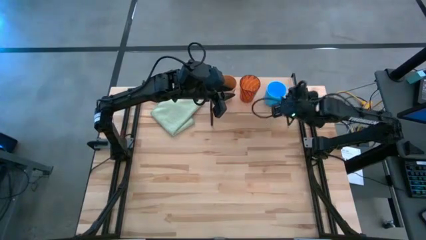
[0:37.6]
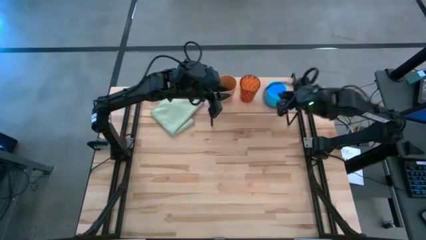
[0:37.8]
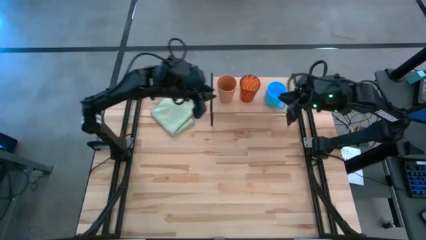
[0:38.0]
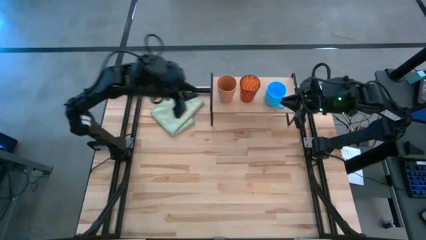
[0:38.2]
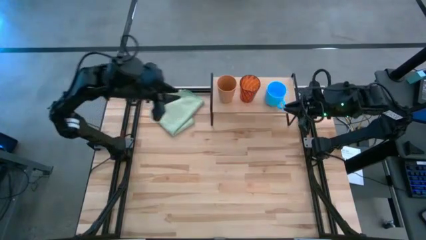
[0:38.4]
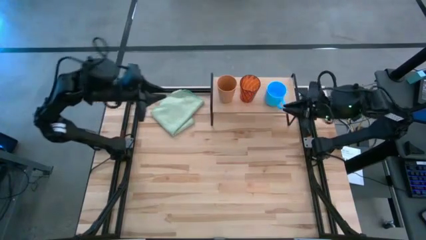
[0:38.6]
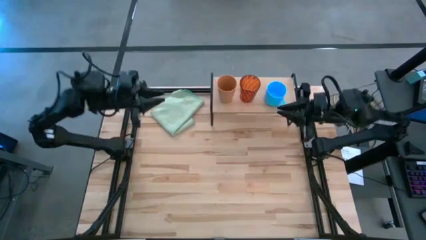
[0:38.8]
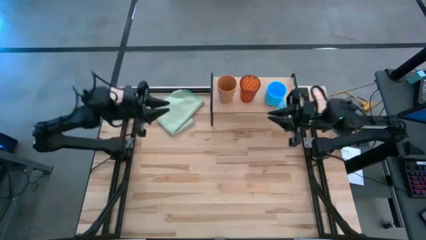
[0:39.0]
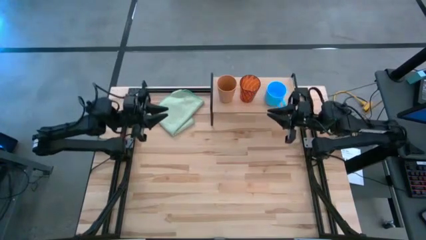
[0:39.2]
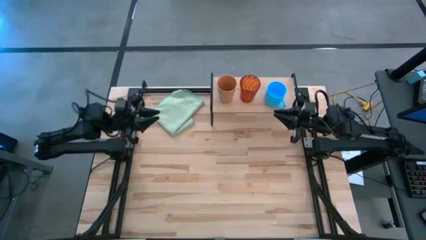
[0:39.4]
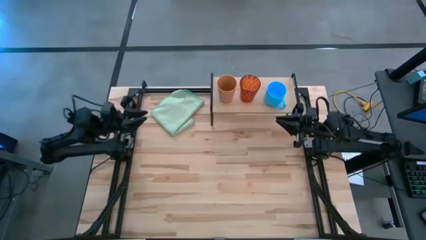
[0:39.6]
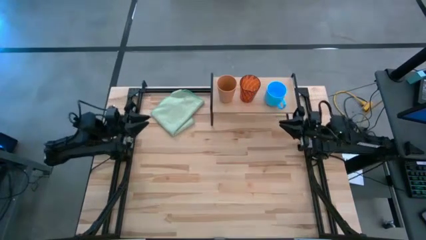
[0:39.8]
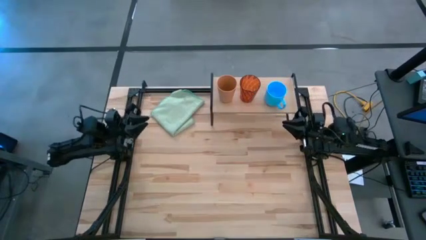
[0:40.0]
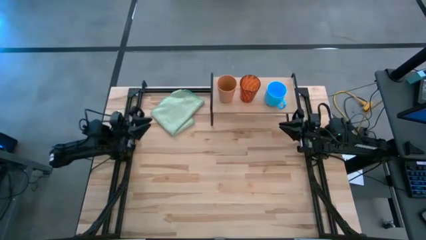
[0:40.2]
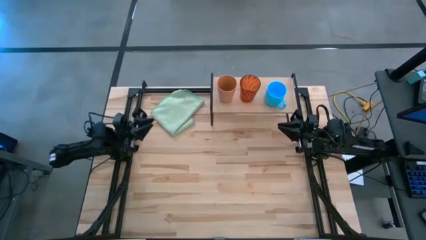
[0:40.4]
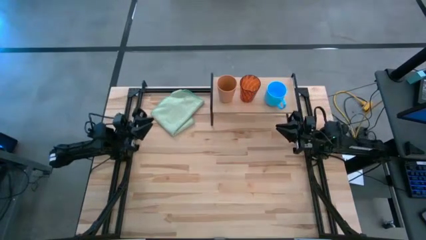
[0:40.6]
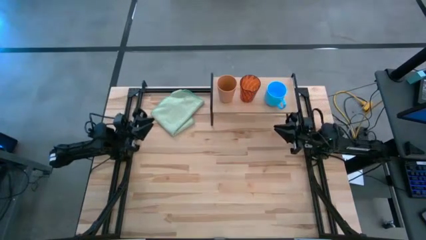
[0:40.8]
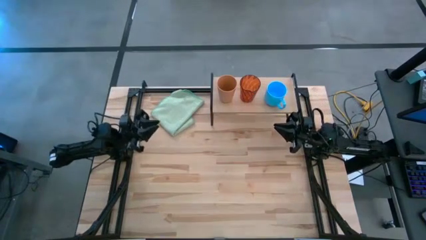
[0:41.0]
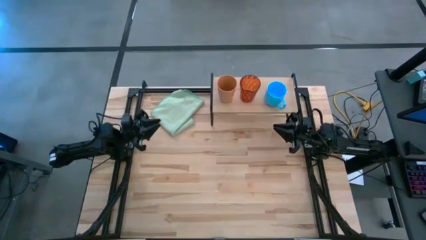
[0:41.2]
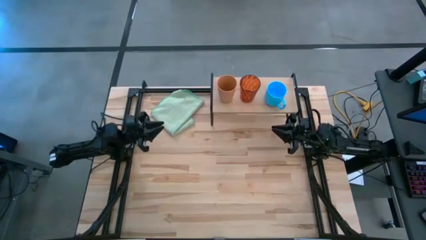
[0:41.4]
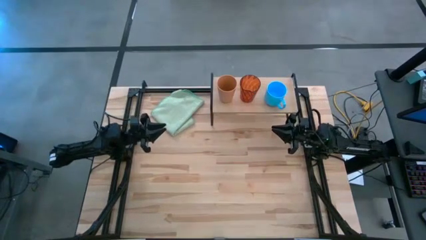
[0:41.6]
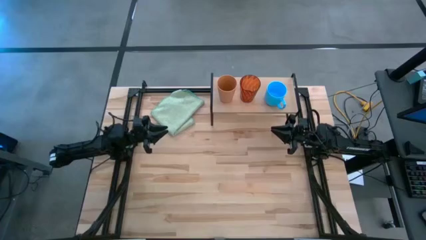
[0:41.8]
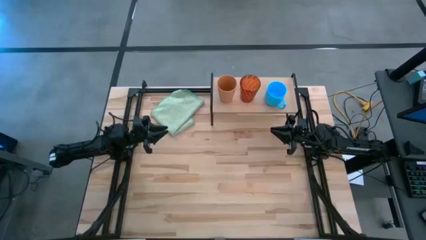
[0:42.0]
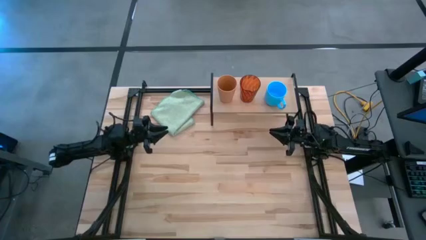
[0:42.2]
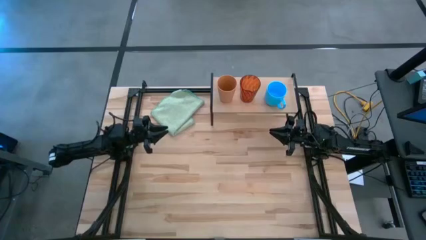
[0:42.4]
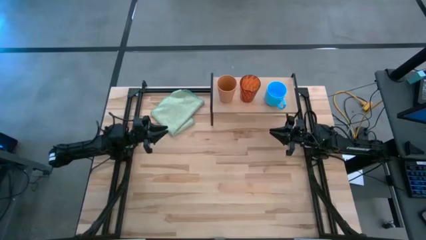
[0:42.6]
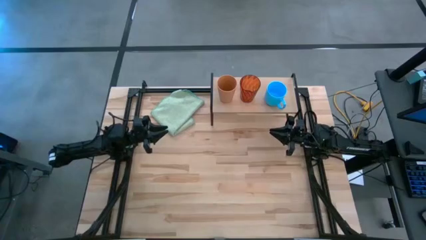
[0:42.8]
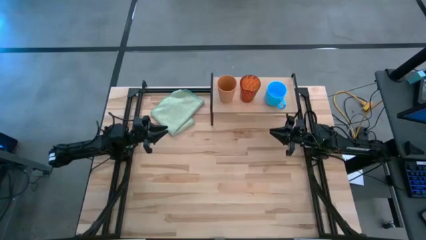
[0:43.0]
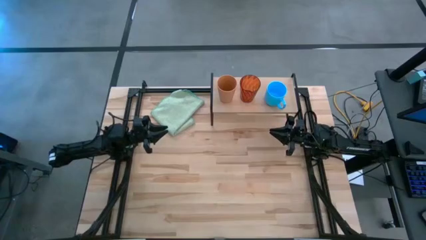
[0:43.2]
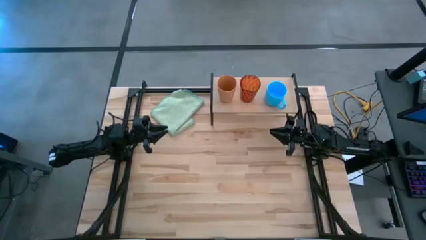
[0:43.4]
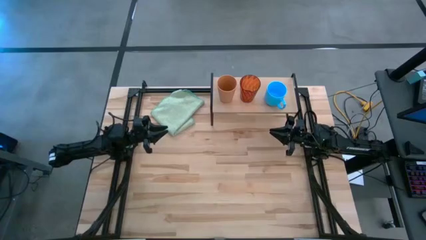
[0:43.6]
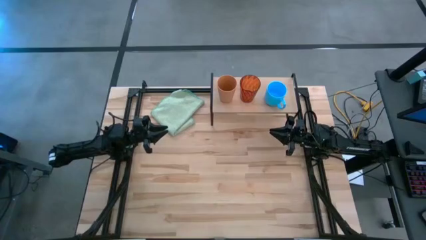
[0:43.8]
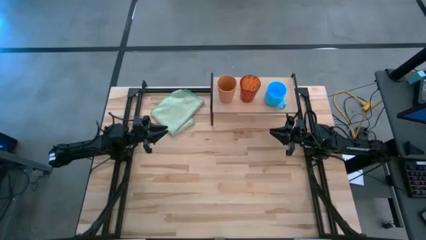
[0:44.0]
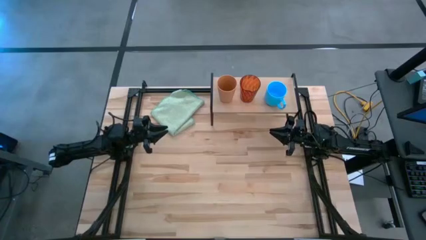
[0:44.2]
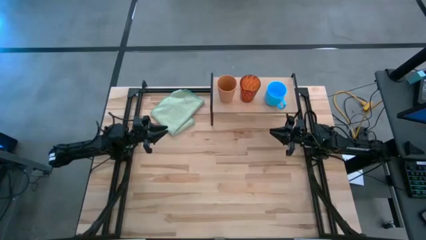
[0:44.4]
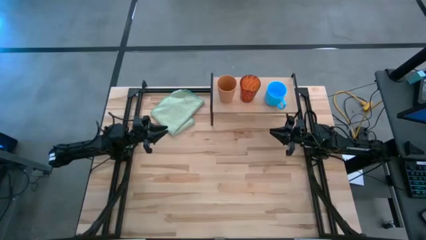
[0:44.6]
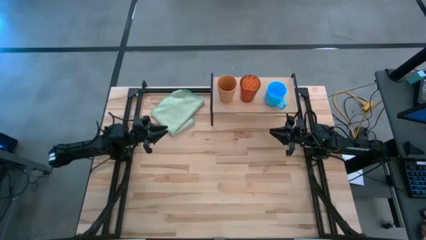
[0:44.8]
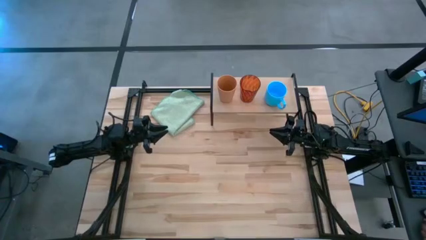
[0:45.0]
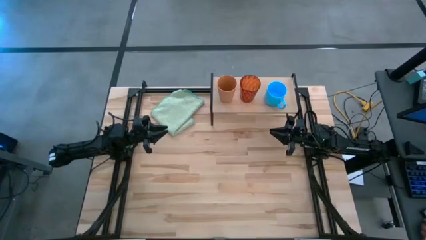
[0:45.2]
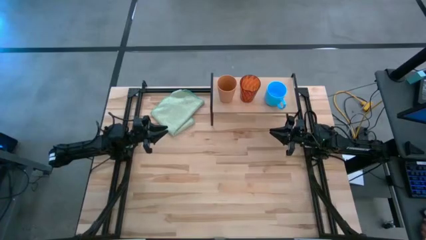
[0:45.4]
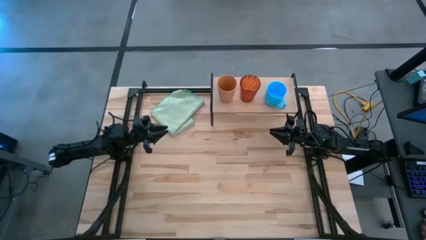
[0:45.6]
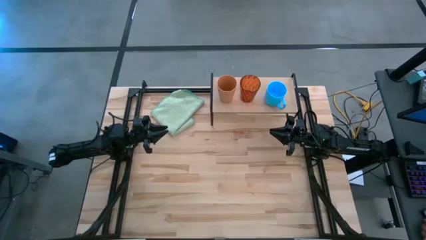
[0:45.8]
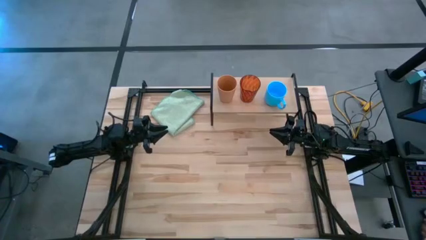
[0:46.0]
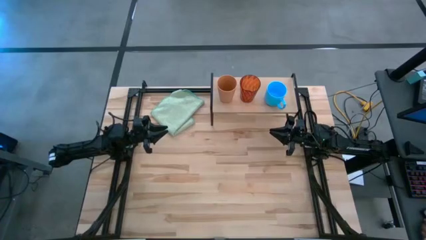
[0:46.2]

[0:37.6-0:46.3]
Task: Stack small to large cups/mugs on shelf
Return to Home Position

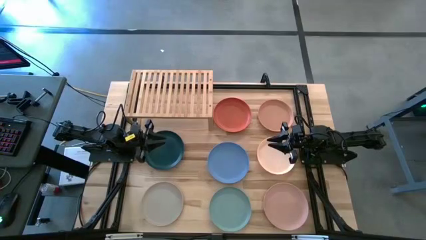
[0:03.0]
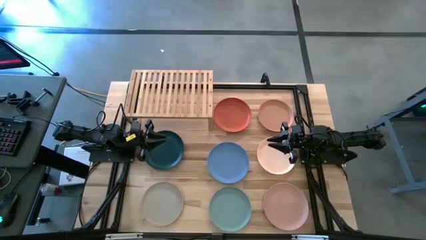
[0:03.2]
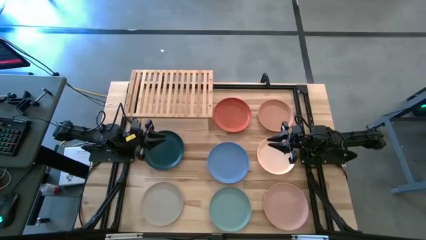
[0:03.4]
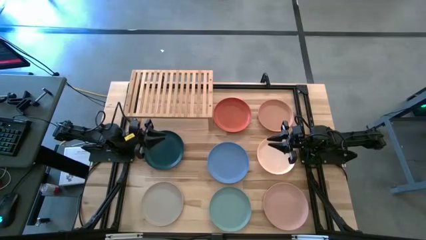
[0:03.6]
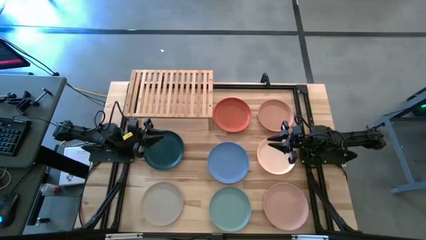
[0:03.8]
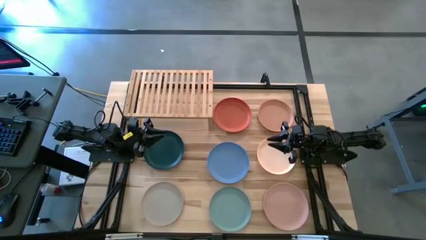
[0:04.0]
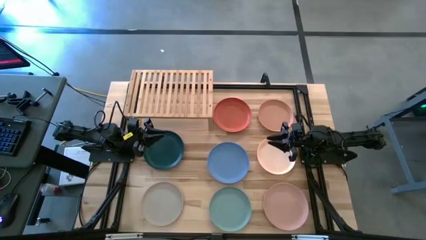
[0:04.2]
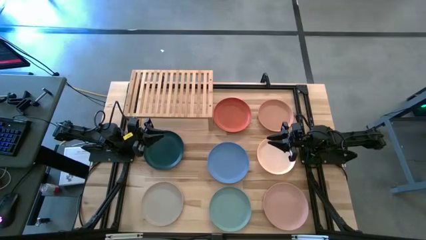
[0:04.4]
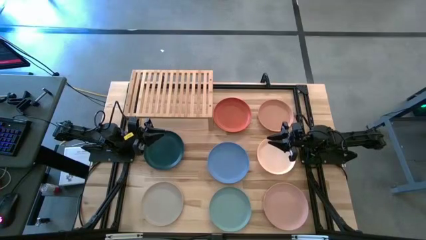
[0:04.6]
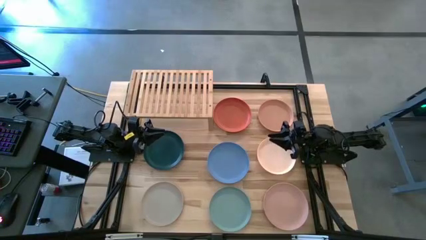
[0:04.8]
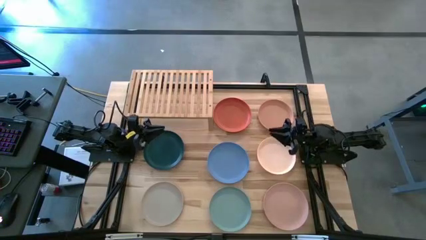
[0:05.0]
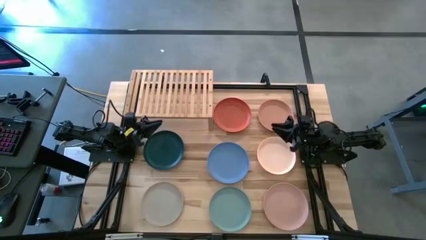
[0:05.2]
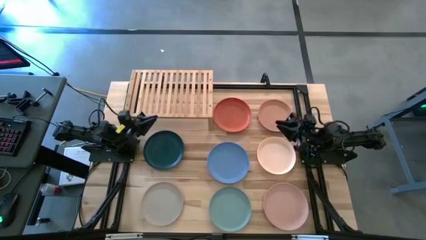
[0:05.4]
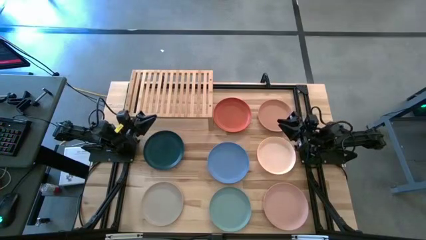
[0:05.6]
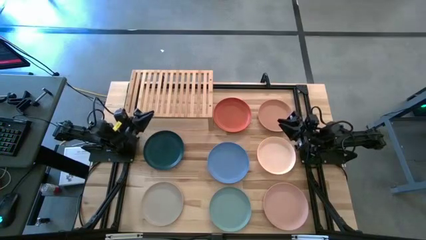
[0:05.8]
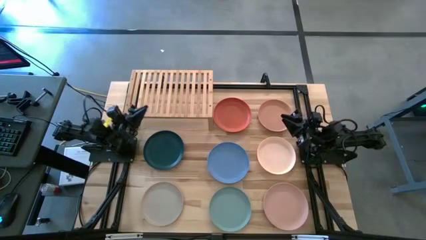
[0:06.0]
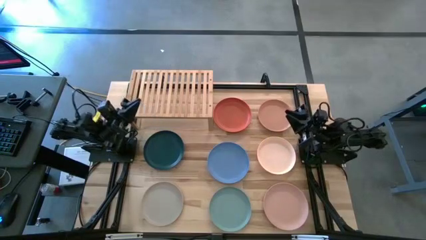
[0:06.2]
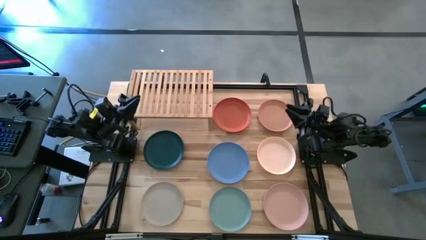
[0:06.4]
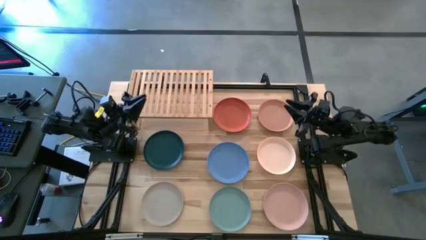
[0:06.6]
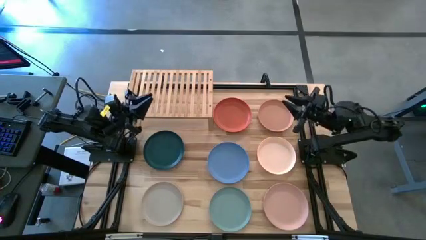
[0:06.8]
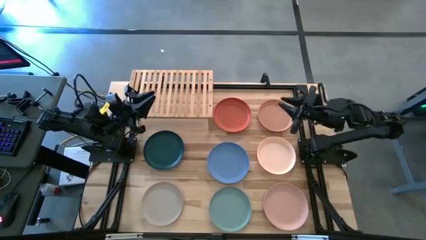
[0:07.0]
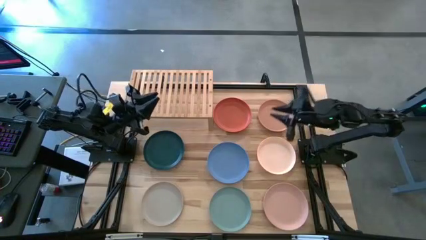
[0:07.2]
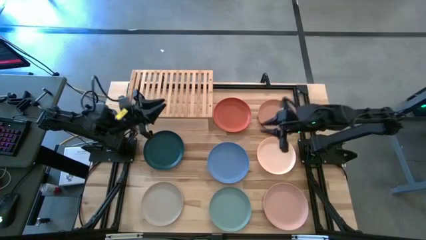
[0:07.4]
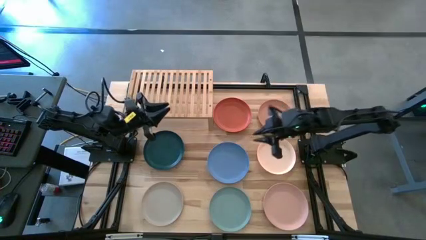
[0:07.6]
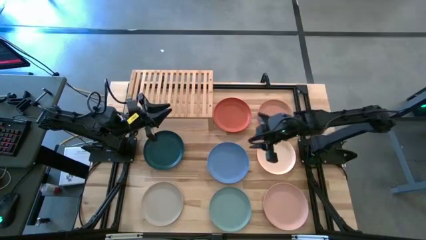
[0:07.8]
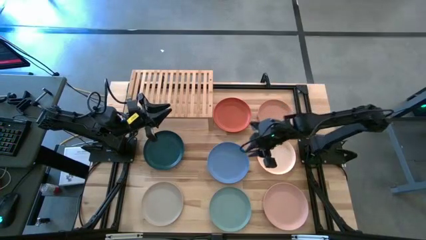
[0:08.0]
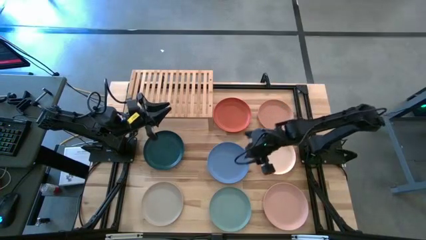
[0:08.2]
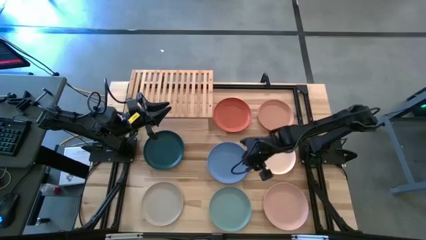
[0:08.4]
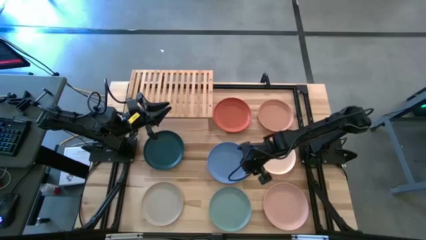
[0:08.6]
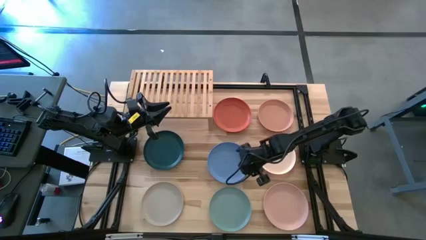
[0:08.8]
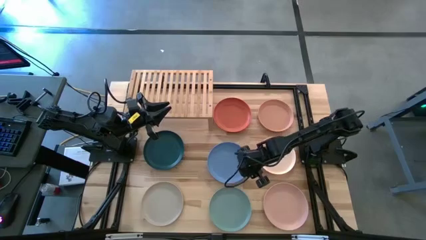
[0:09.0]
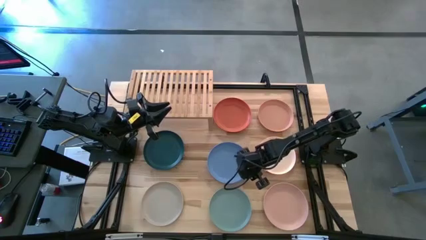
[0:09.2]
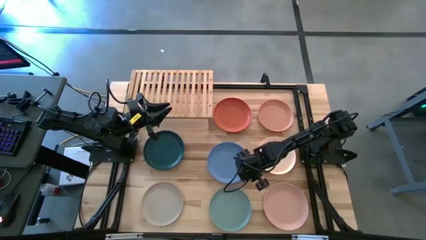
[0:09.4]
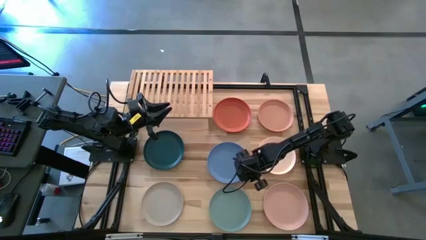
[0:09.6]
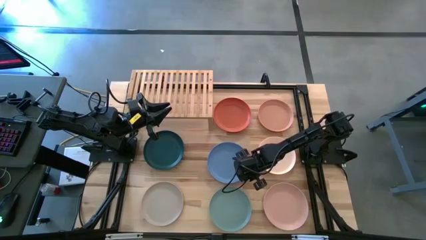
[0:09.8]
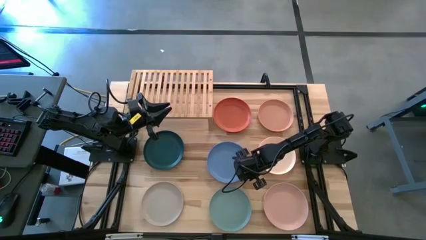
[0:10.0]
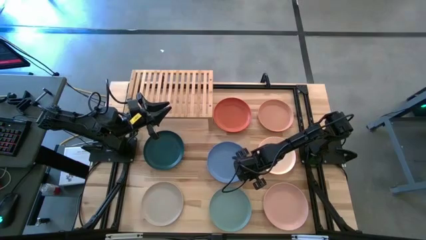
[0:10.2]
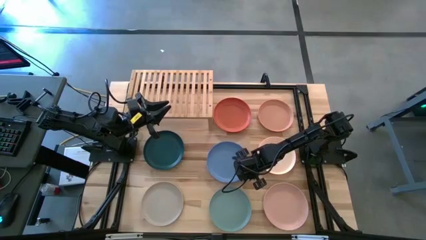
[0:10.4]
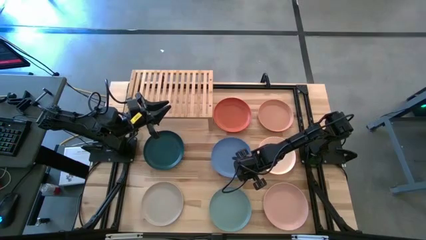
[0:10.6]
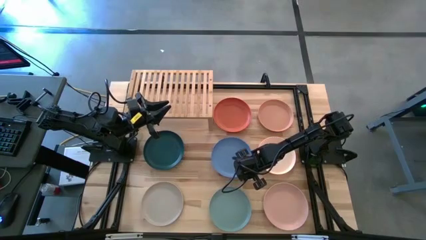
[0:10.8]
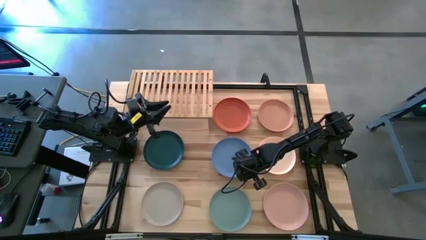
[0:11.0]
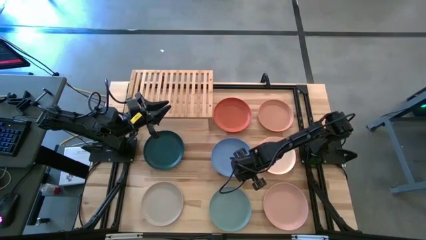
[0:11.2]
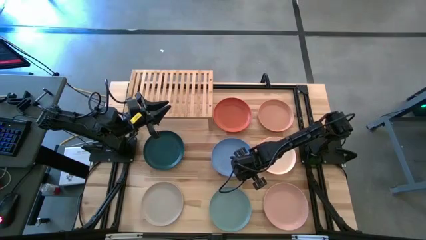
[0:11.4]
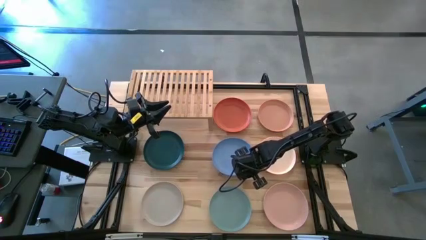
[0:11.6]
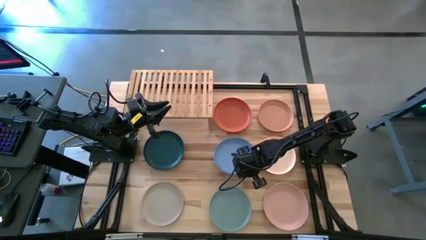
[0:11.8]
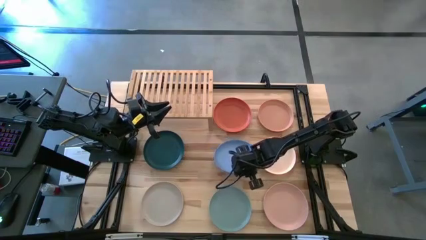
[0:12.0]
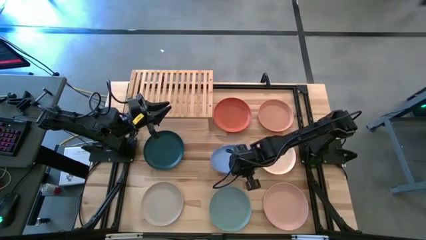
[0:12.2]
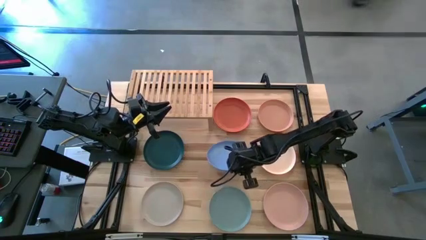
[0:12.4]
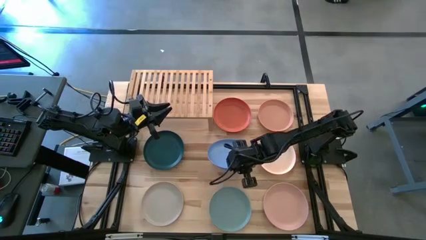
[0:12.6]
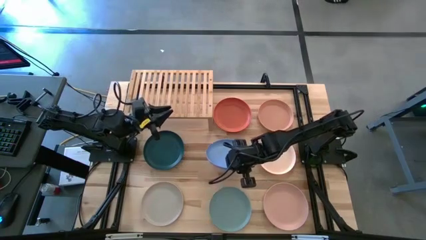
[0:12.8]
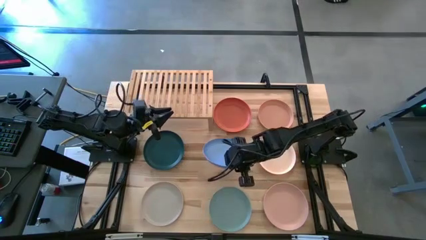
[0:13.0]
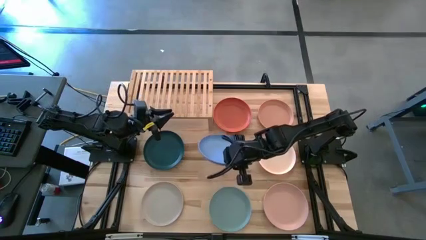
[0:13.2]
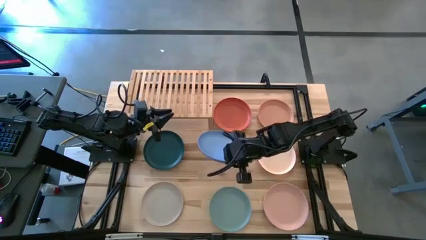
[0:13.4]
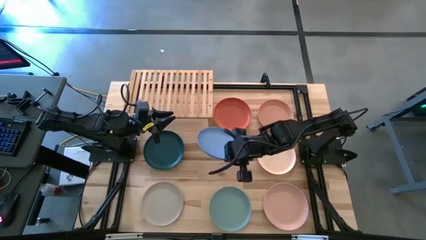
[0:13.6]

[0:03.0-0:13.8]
Task: Place and stack plates onto a shelf
Put the light blue plate on the shelf
